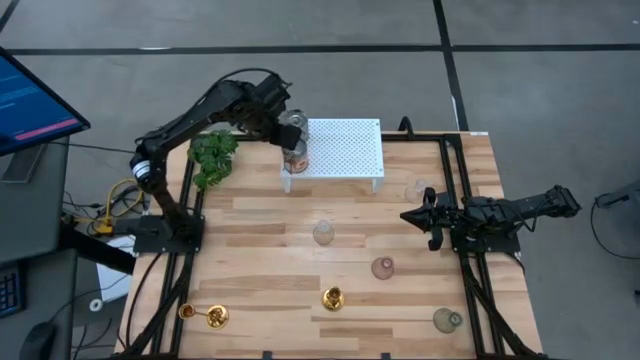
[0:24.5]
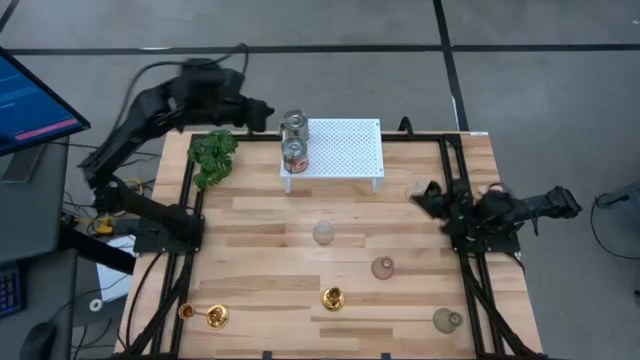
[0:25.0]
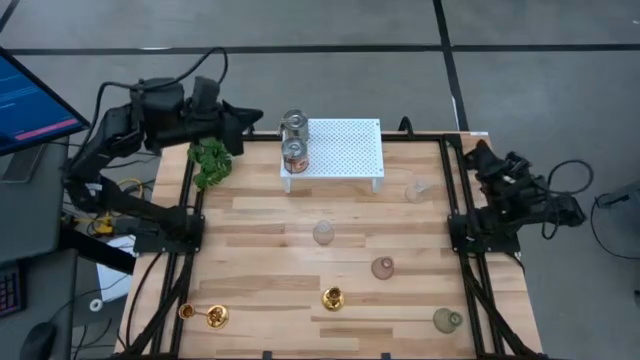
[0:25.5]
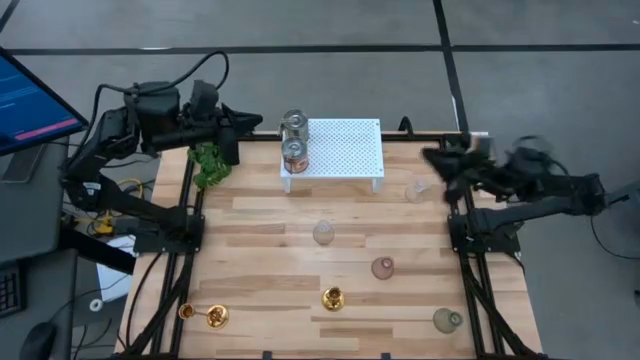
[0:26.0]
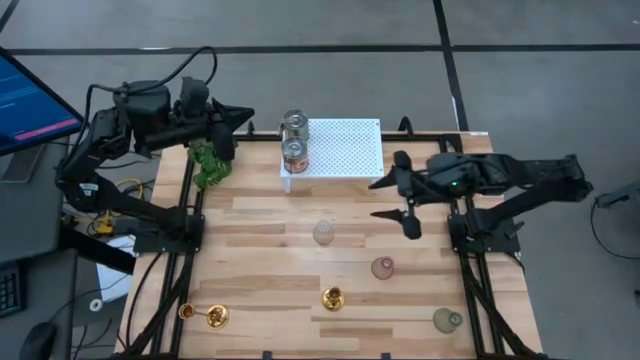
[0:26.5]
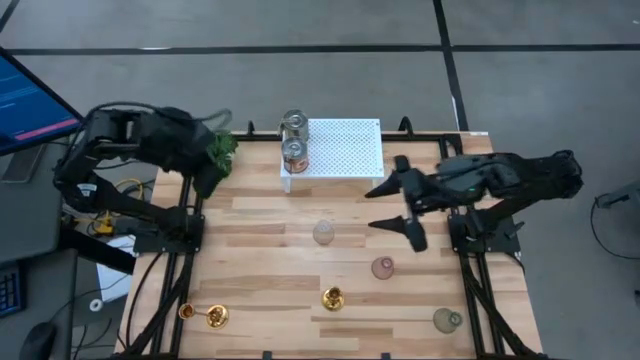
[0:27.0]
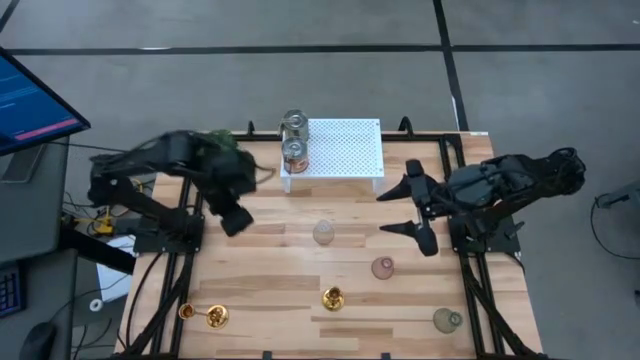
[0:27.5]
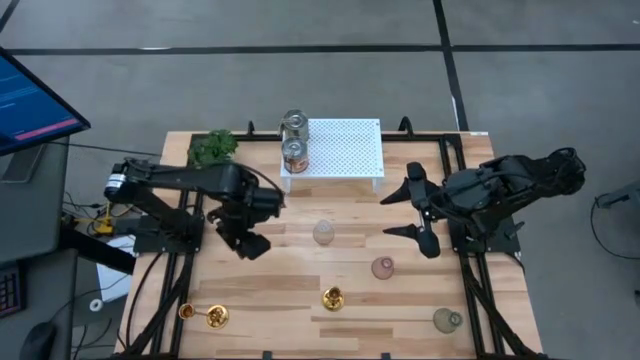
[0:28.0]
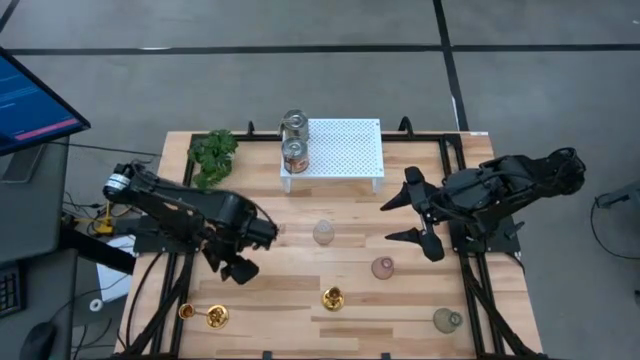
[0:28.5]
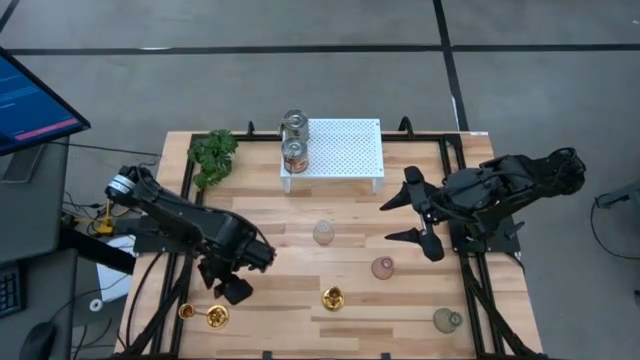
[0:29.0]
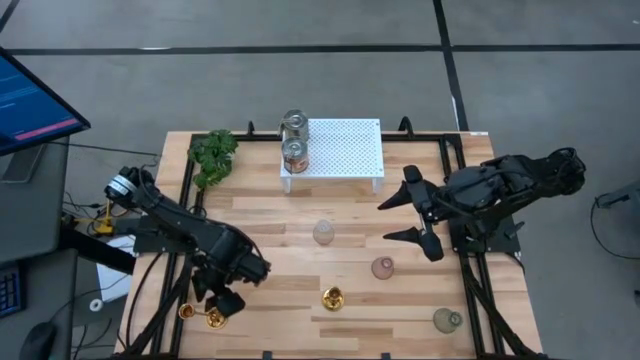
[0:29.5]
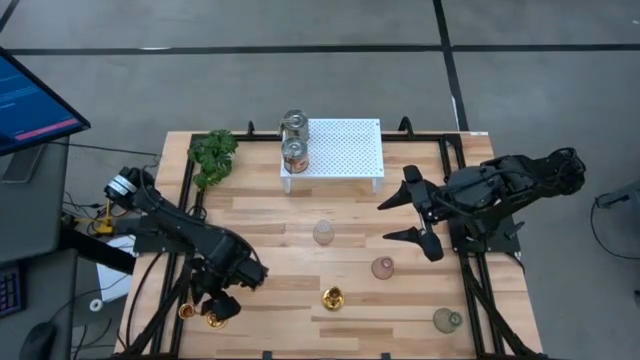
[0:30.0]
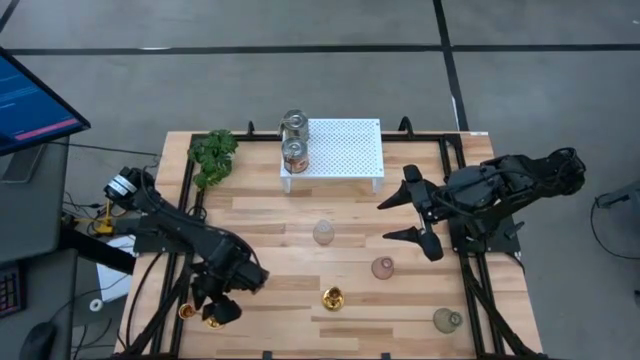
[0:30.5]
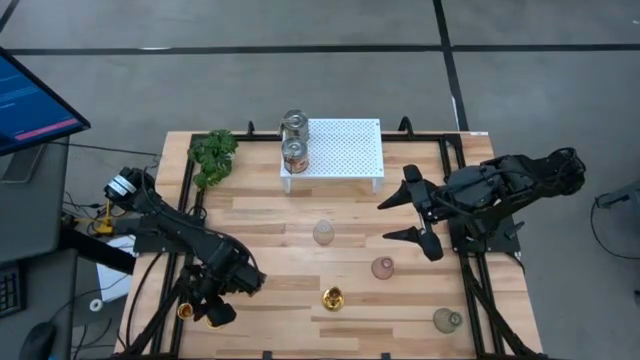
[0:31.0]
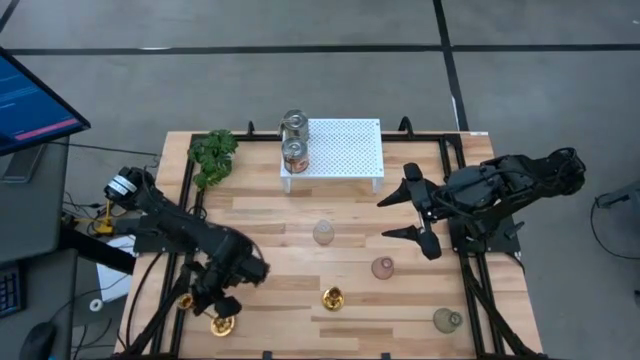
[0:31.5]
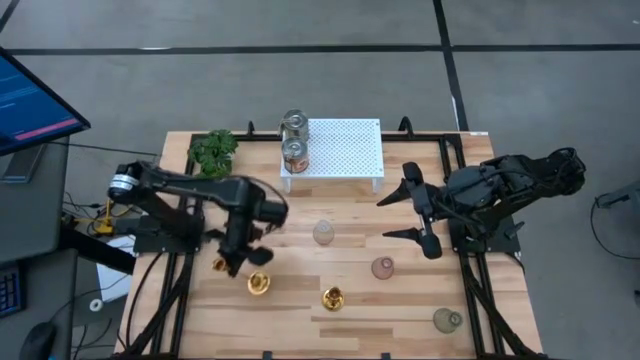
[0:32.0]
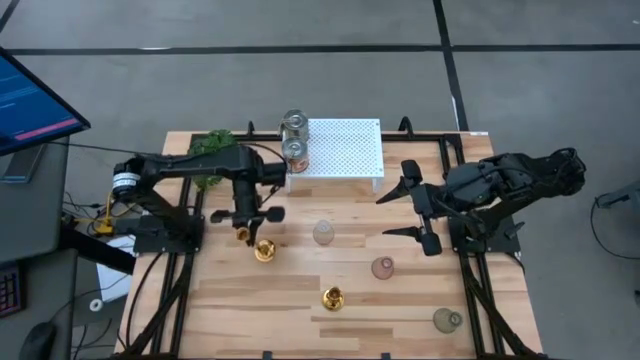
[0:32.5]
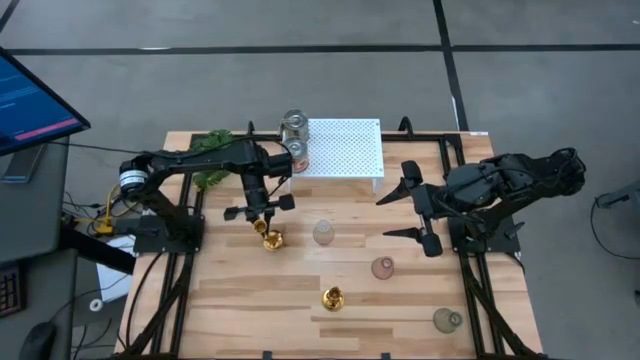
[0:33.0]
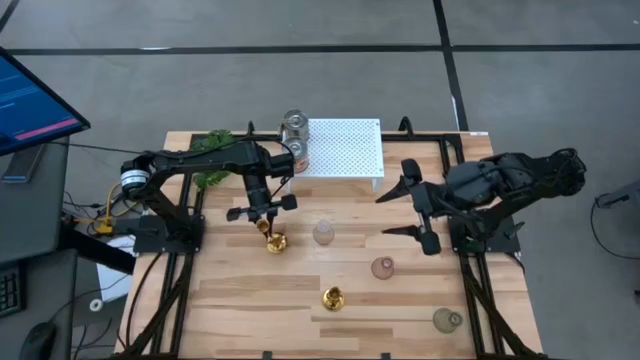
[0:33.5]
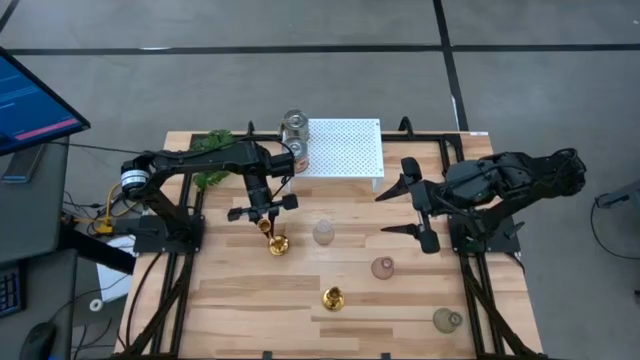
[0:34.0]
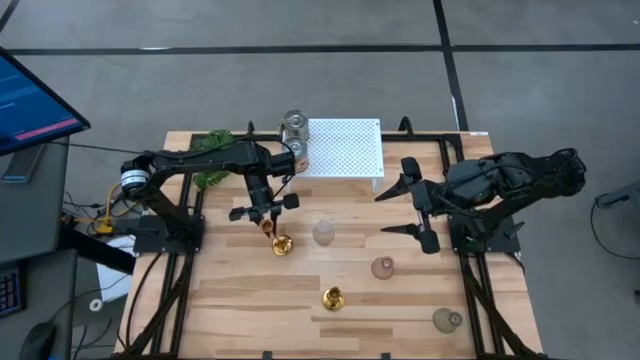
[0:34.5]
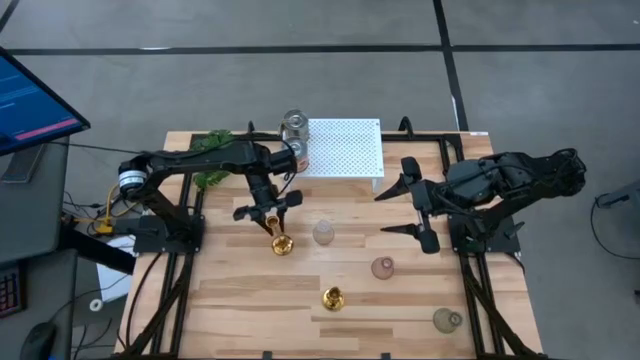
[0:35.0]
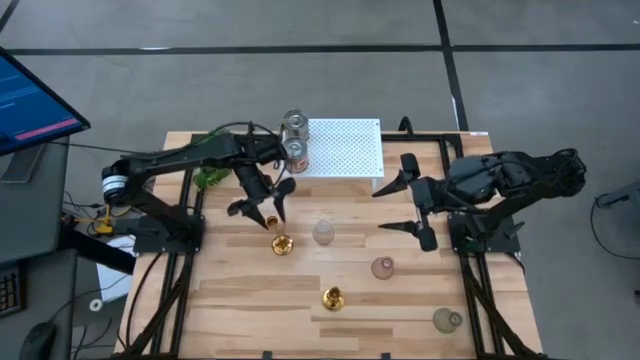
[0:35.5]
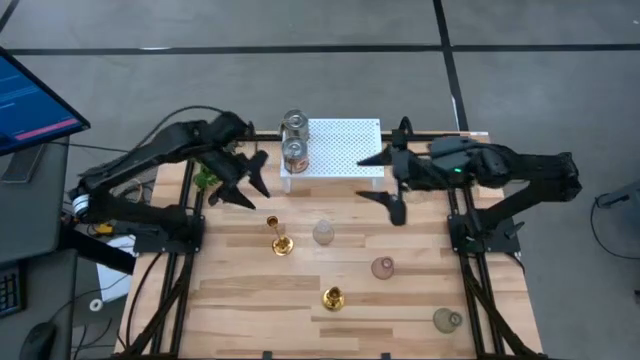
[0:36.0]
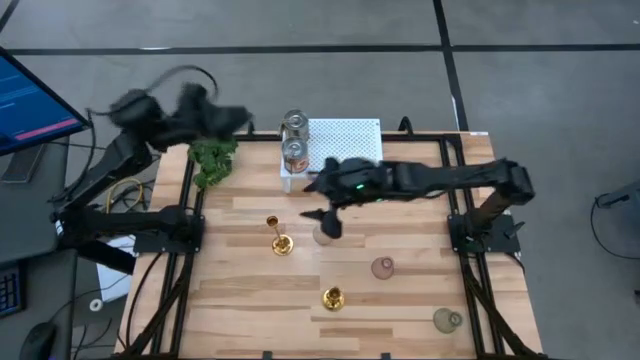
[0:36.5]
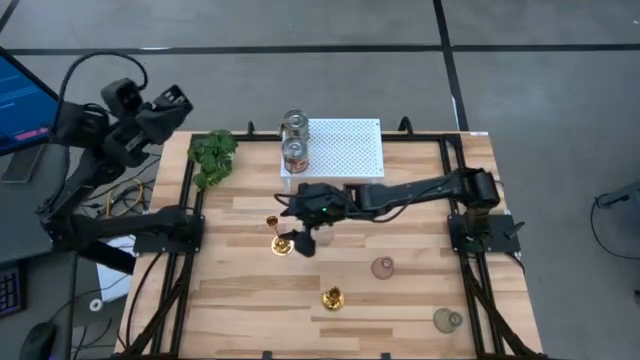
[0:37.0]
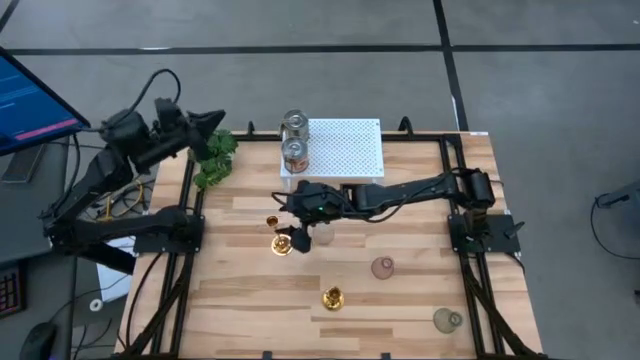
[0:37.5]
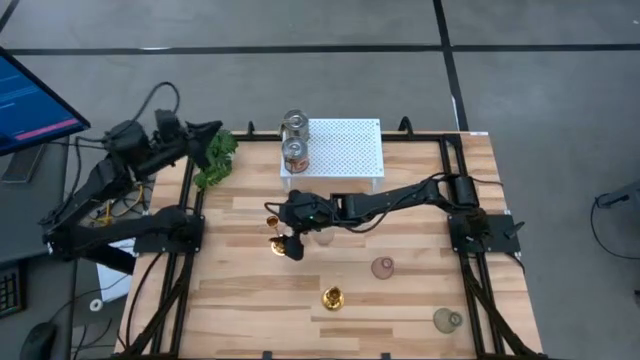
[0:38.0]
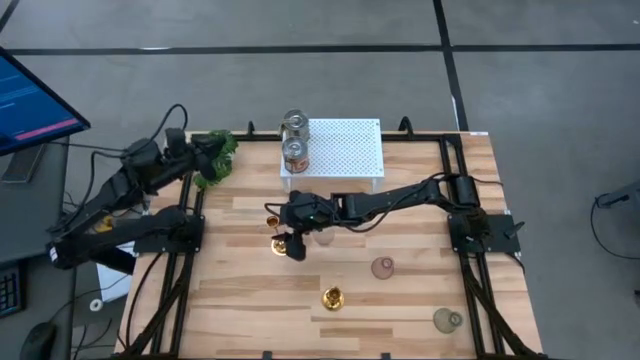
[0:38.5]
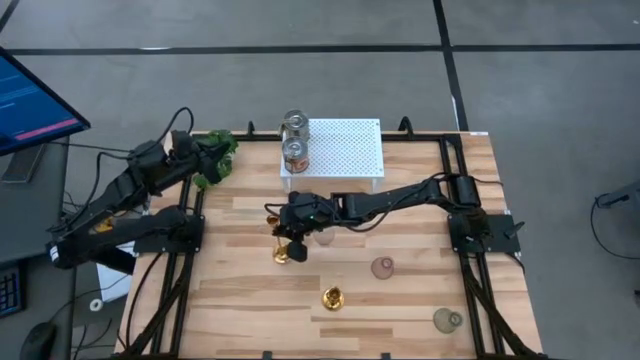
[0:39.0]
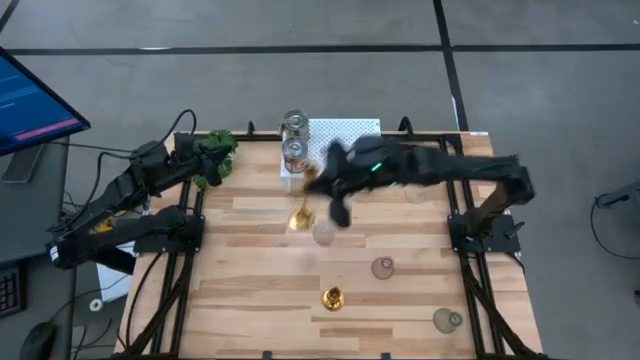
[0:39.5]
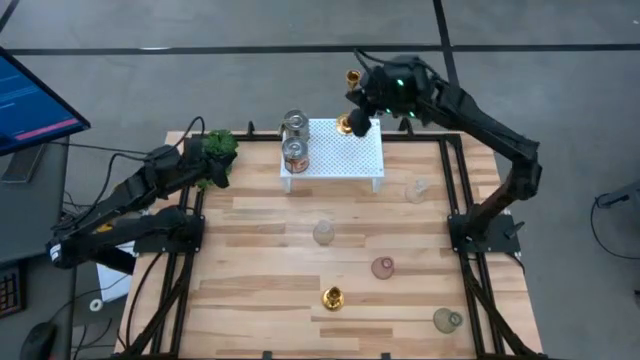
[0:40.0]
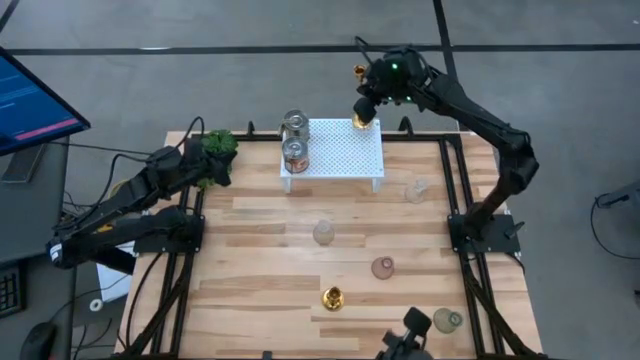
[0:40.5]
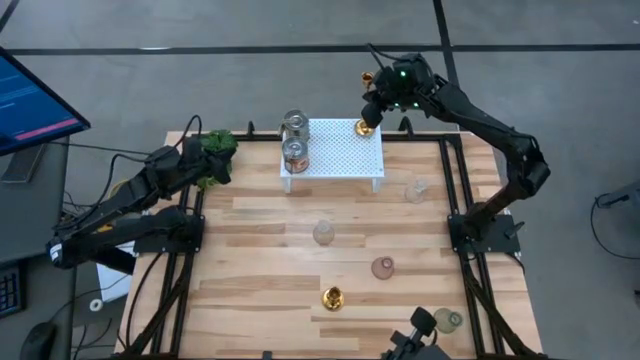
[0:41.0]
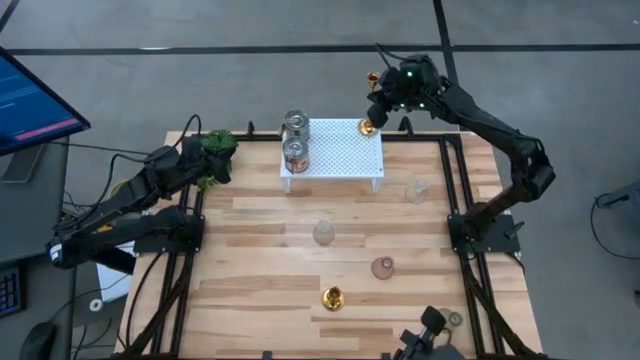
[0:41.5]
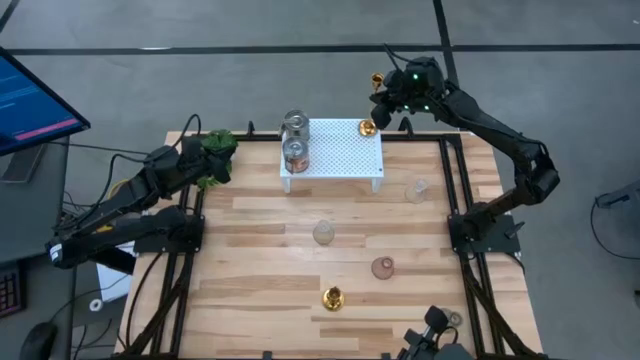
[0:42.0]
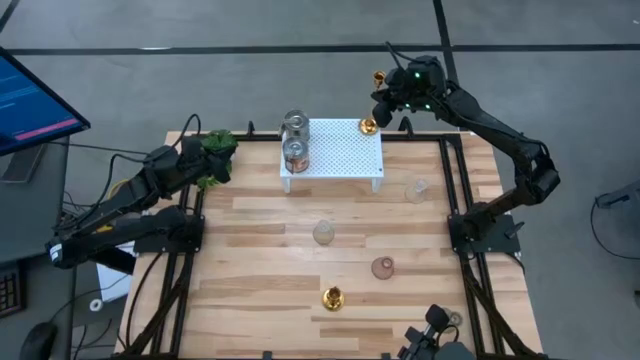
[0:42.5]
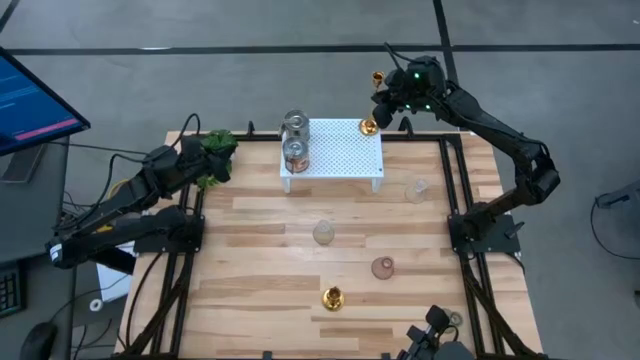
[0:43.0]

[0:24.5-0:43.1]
Task: Pick & Place candle stick holders
Put the left gold candle holder on the shelf

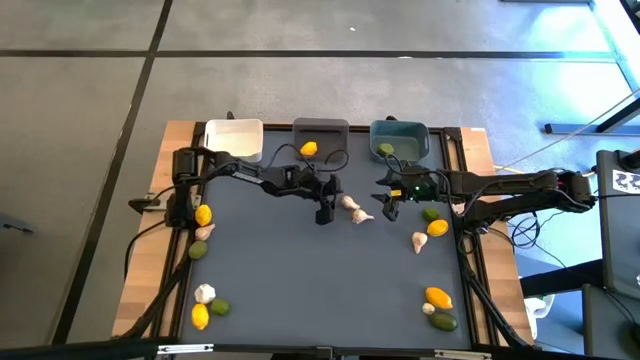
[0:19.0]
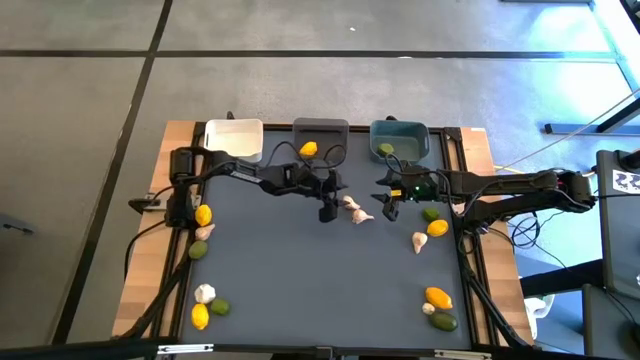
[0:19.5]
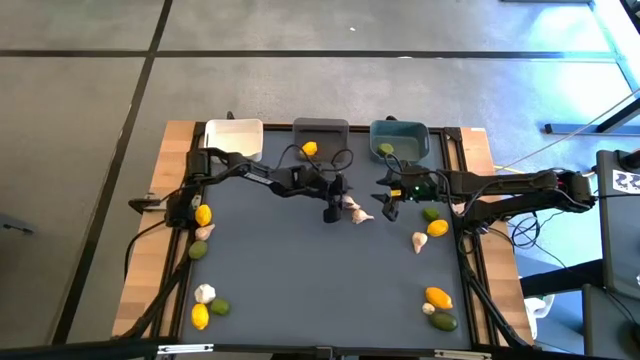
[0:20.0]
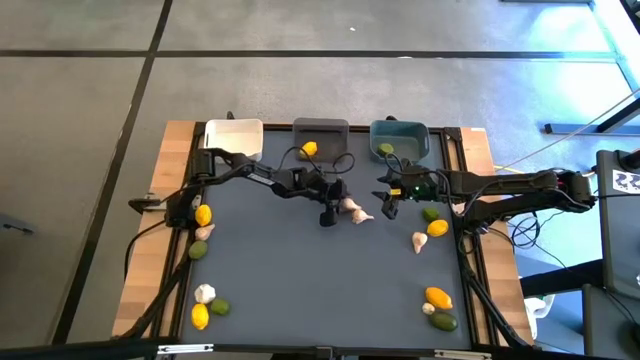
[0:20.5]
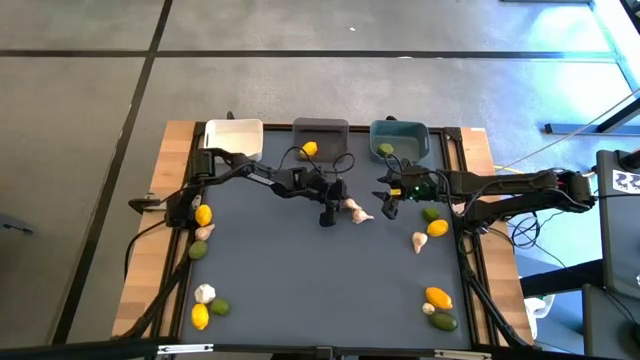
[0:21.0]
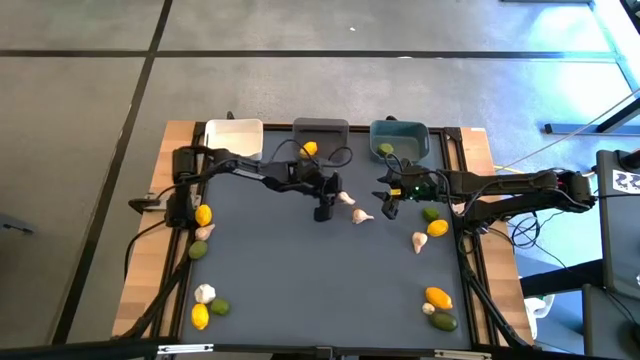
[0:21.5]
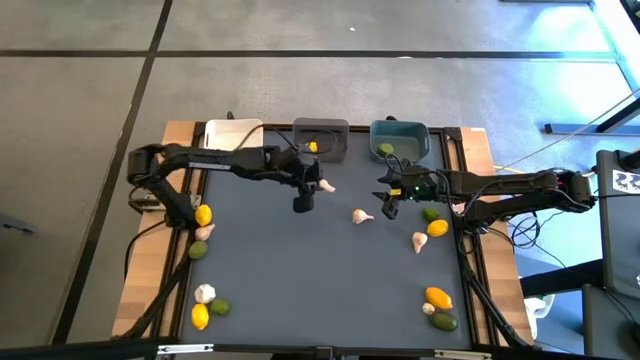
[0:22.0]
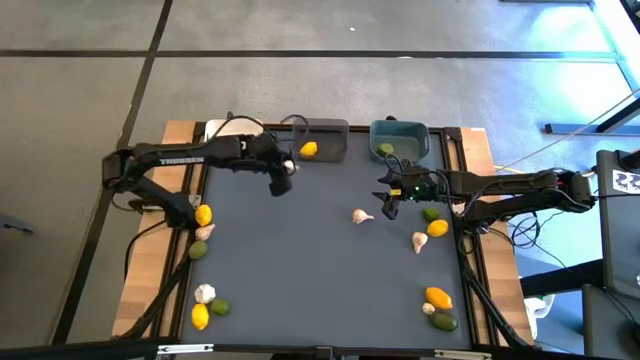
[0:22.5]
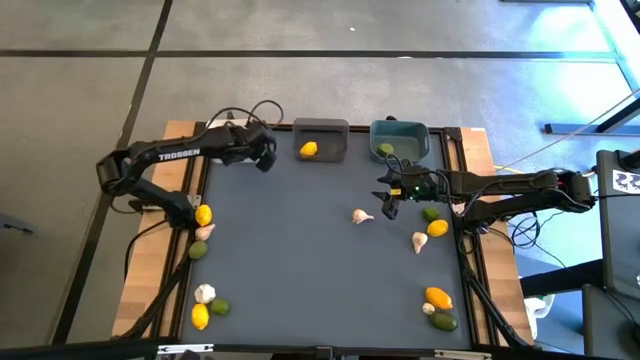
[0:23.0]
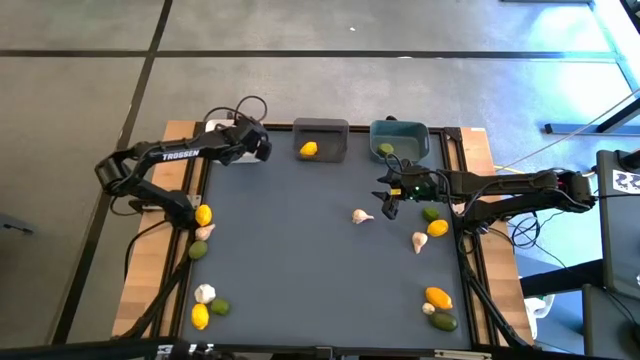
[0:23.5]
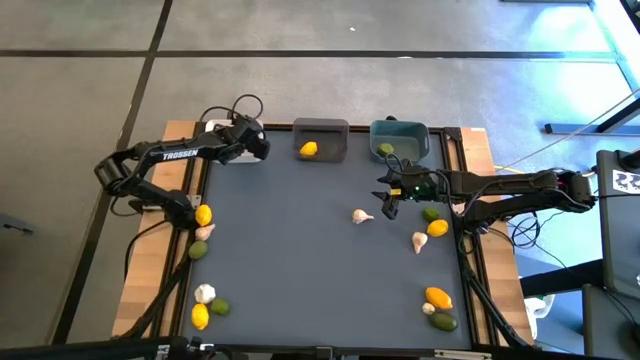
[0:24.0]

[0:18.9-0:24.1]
Task: Sort produce into baskets
Put the garlic into the white bin
